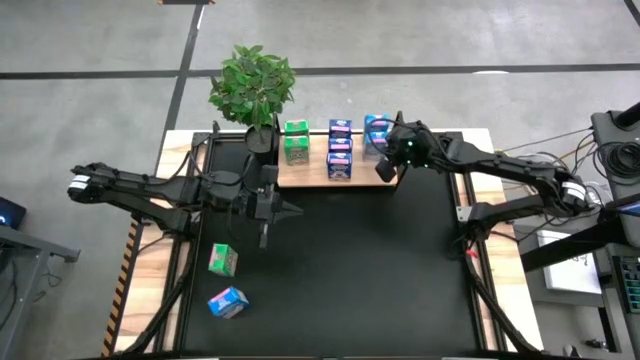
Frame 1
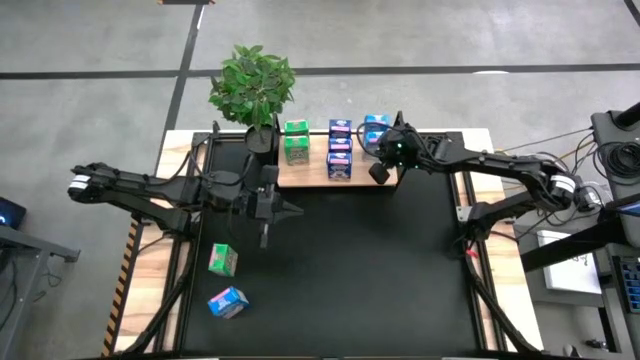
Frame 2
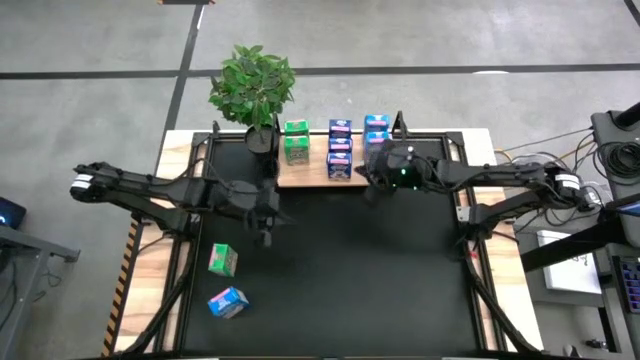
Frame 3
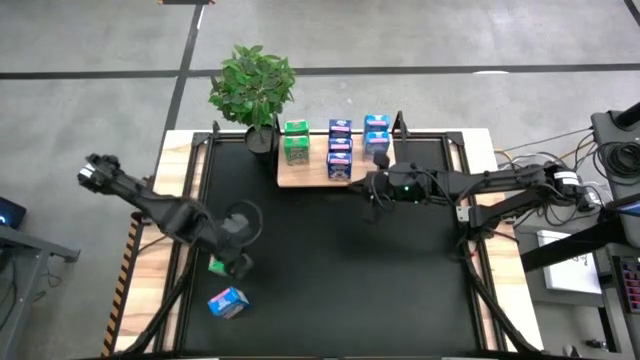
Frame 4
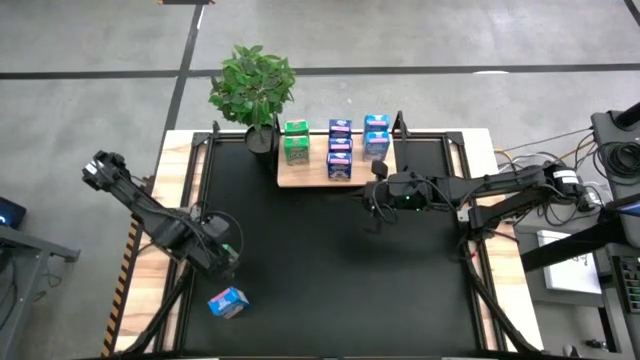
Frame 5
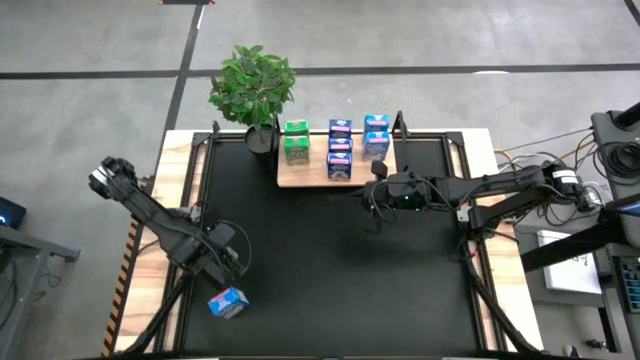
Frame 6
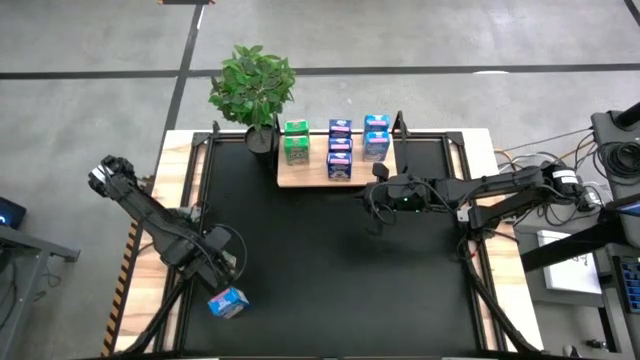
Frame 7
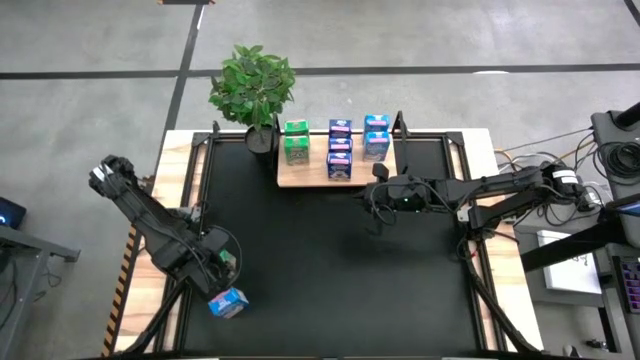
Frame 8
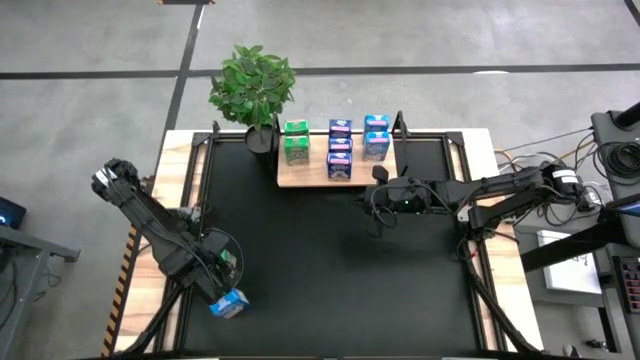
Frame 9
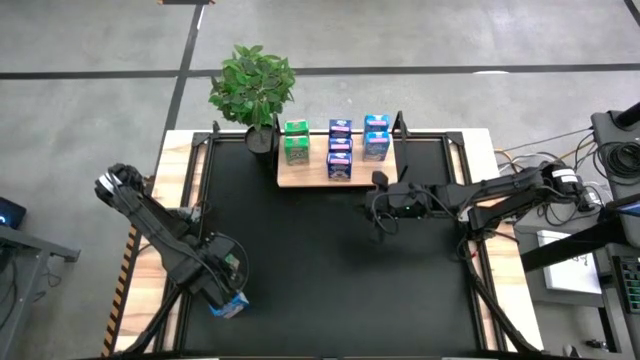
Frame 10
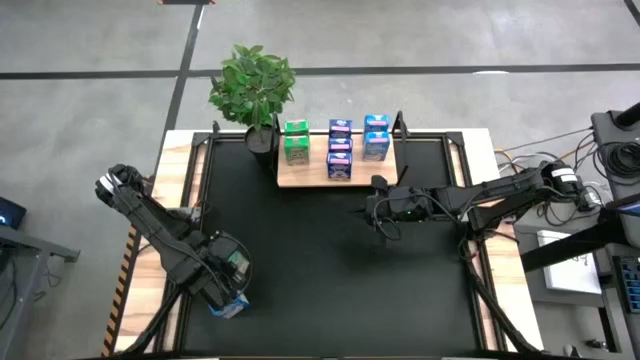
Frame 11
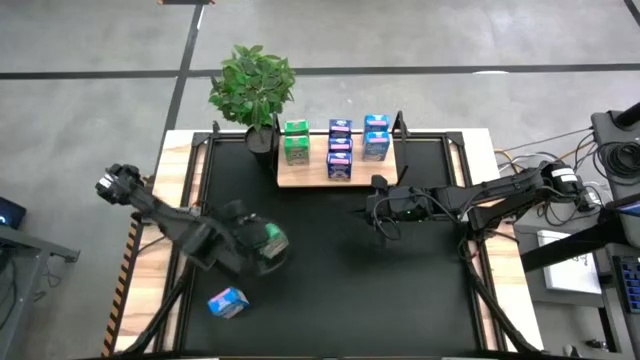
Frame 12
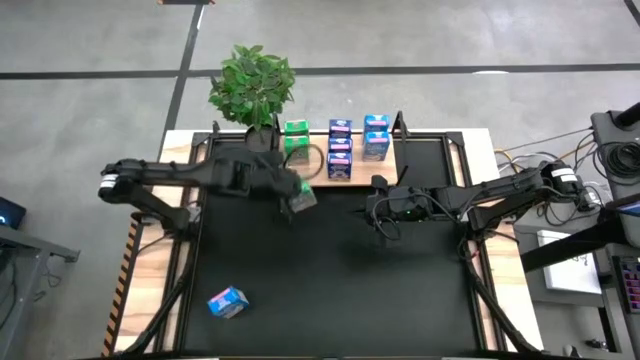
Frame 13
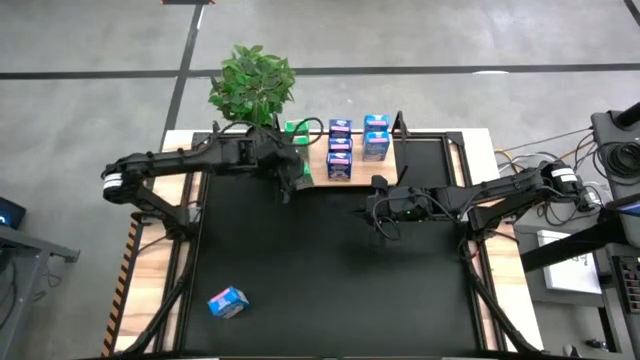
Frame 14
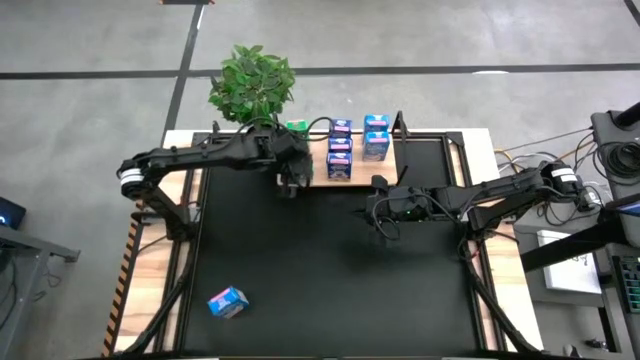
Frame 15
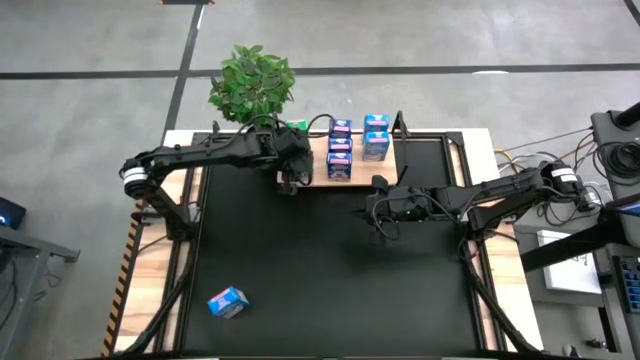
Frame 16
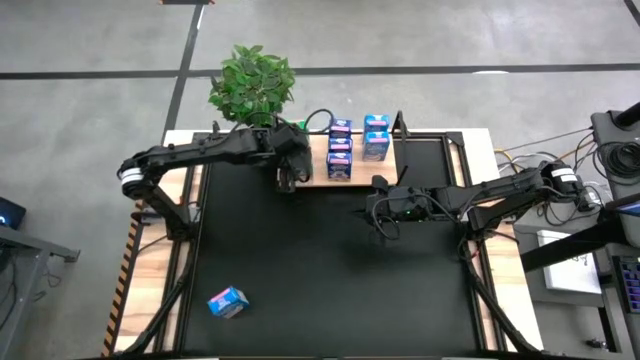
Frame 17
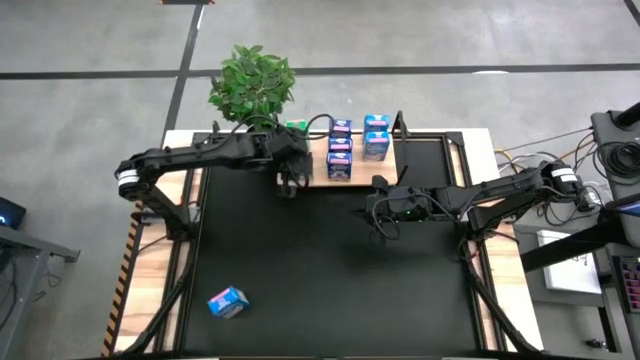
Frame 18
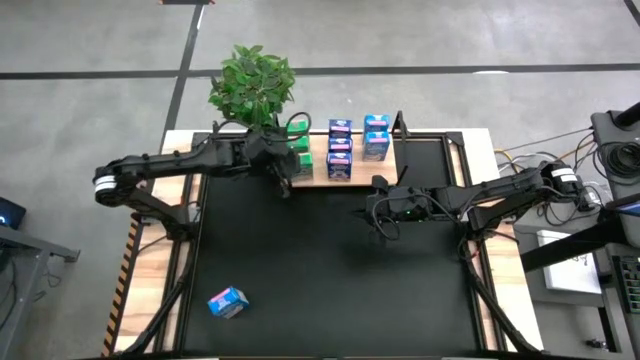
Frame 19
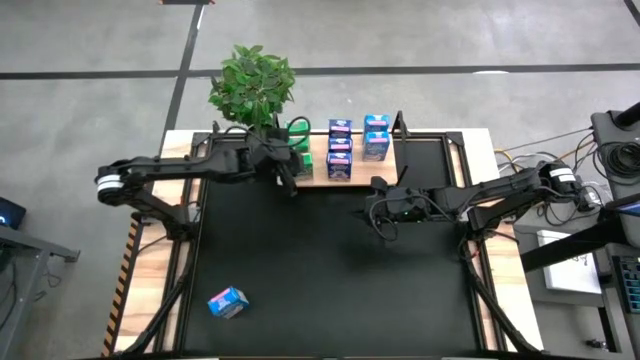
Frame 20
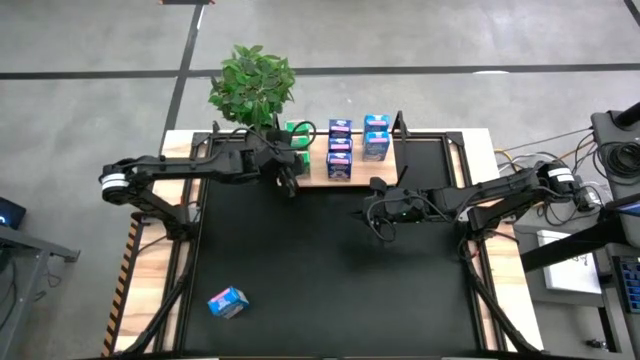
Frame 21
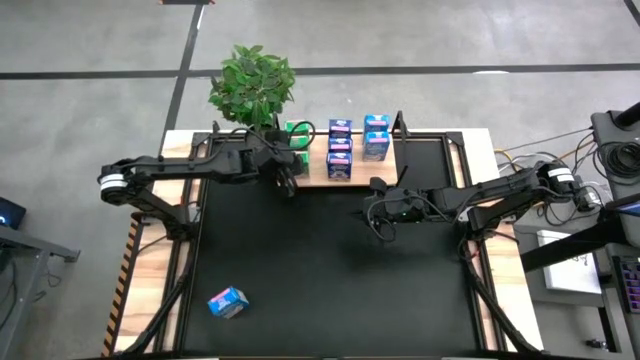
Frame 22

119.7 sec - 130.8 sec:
Task: Stack cereal on shelf
Put the green cereal box aligned with the green cereal boxes on the shelf

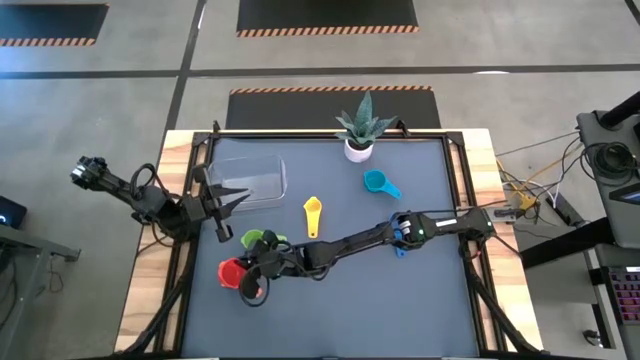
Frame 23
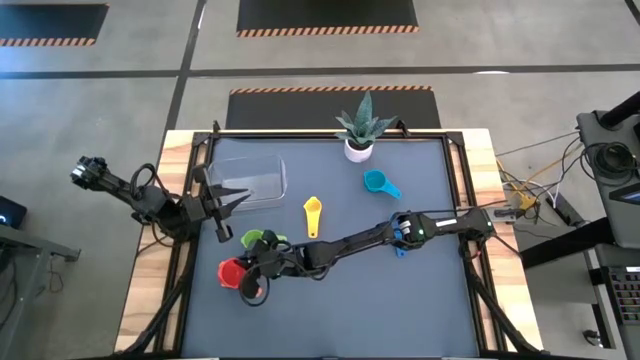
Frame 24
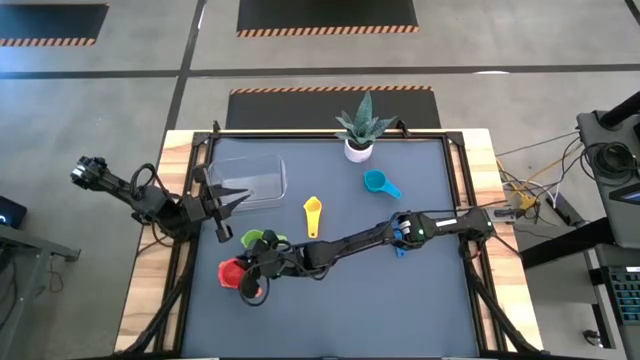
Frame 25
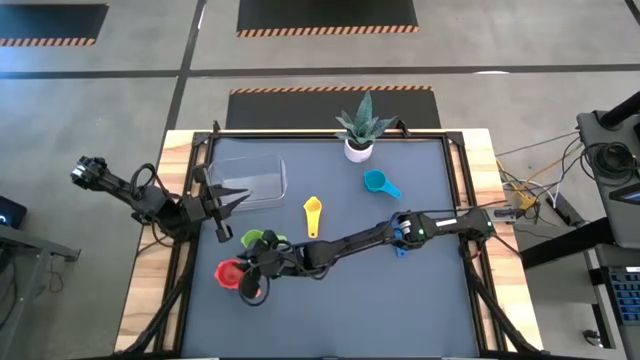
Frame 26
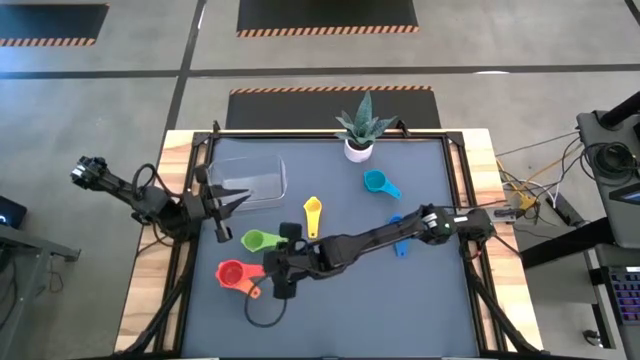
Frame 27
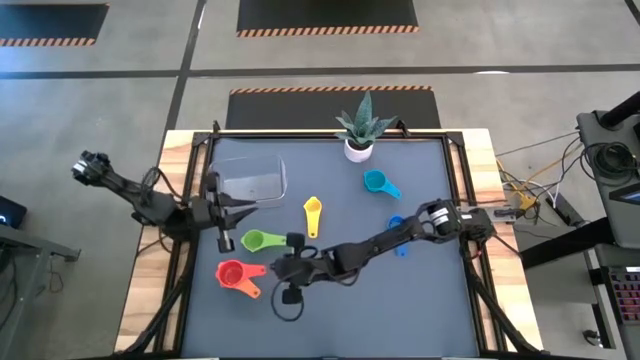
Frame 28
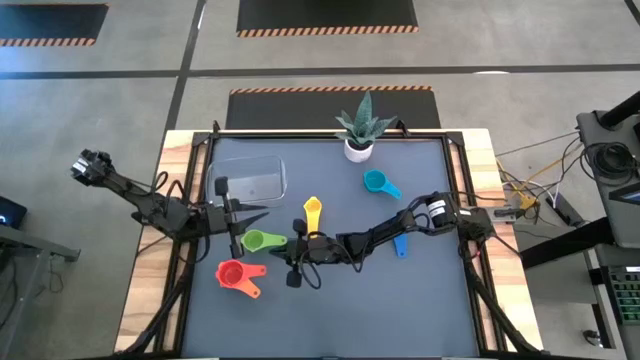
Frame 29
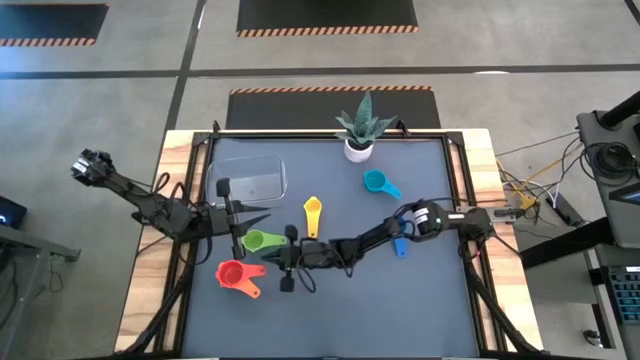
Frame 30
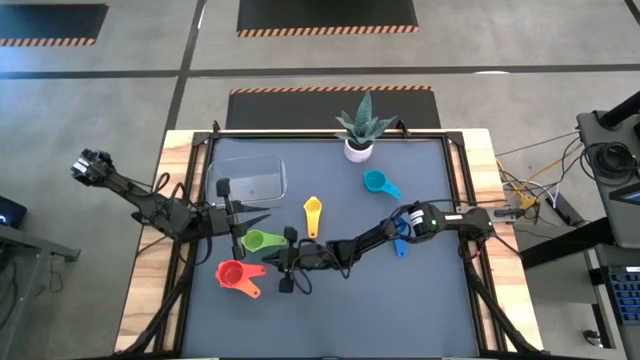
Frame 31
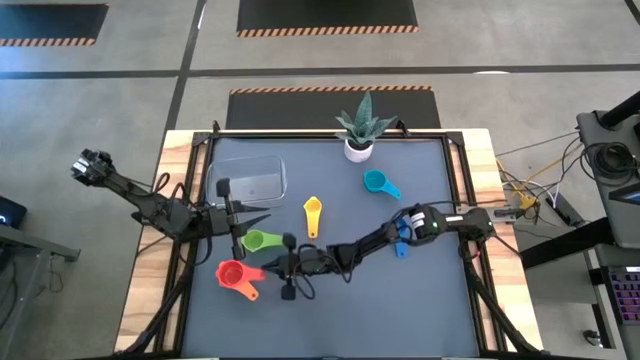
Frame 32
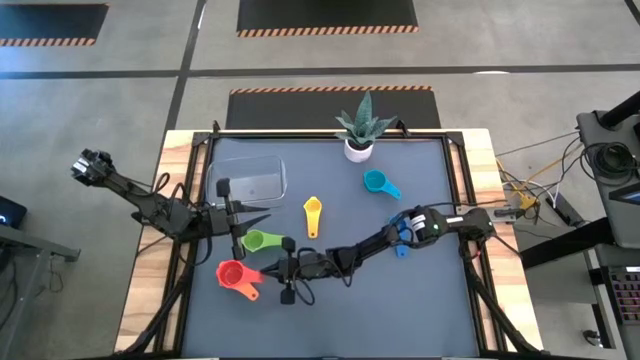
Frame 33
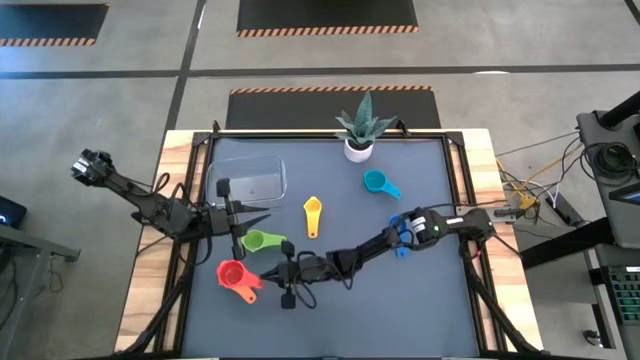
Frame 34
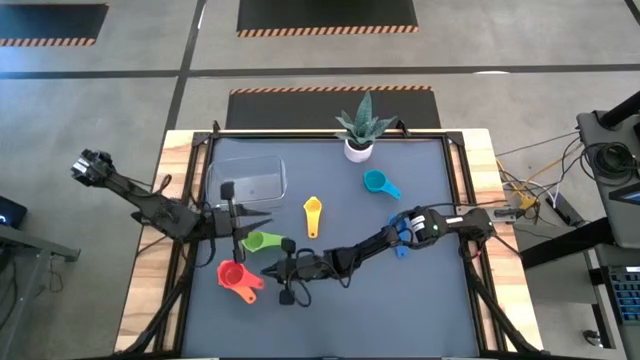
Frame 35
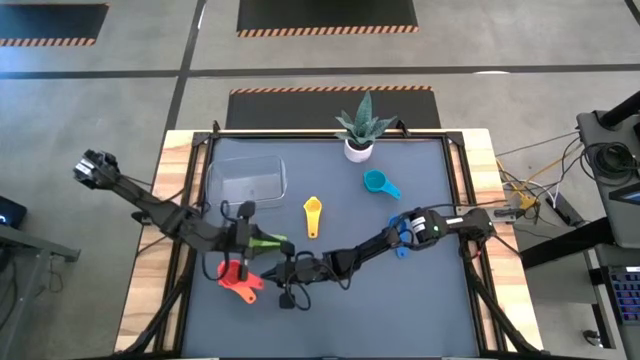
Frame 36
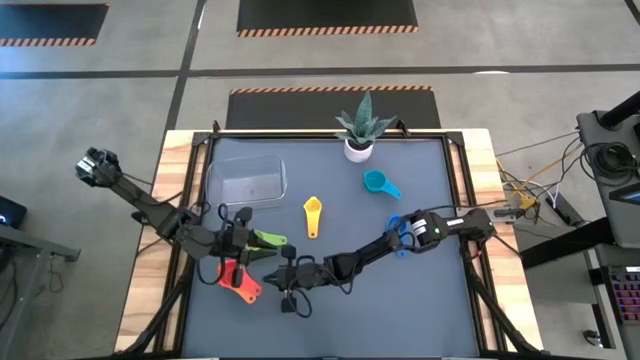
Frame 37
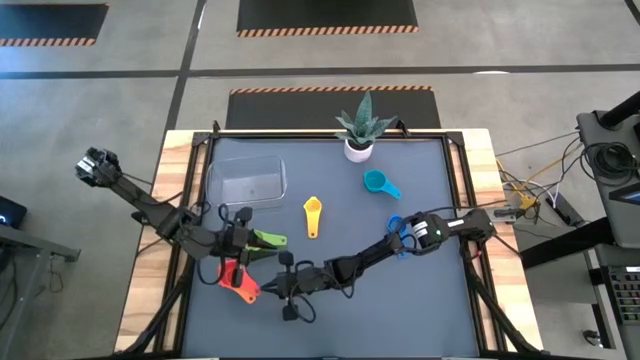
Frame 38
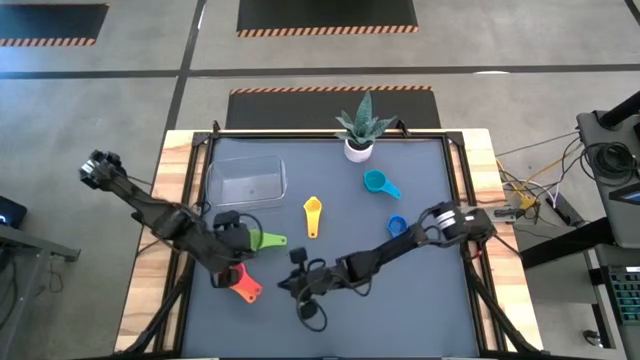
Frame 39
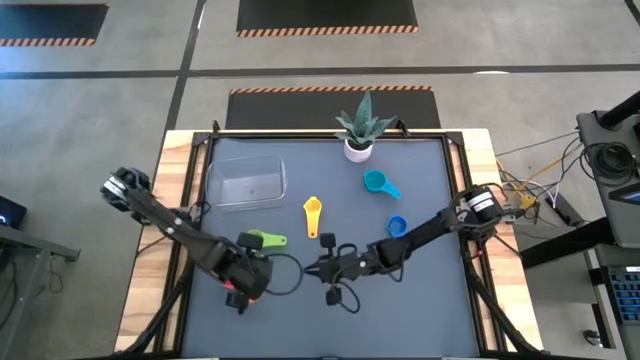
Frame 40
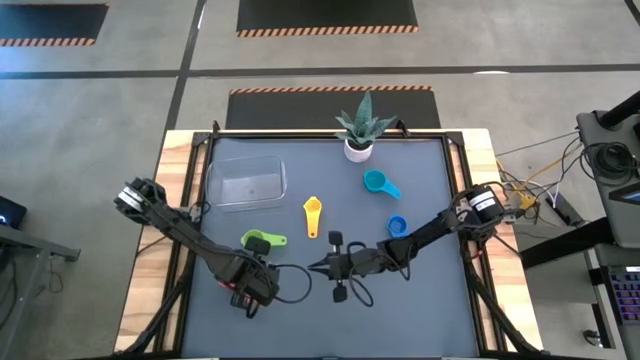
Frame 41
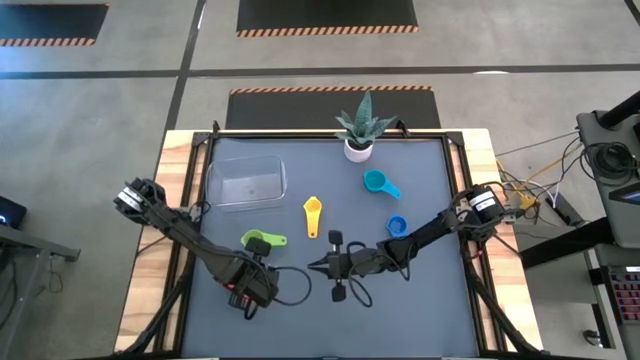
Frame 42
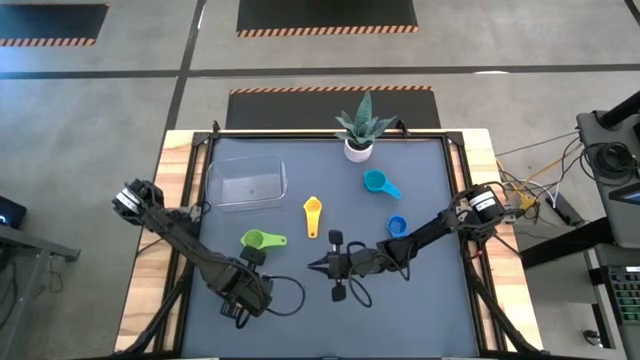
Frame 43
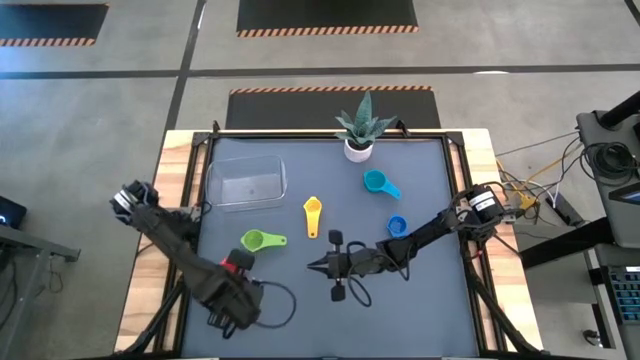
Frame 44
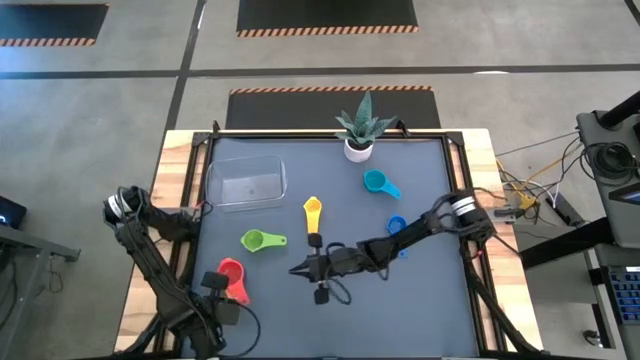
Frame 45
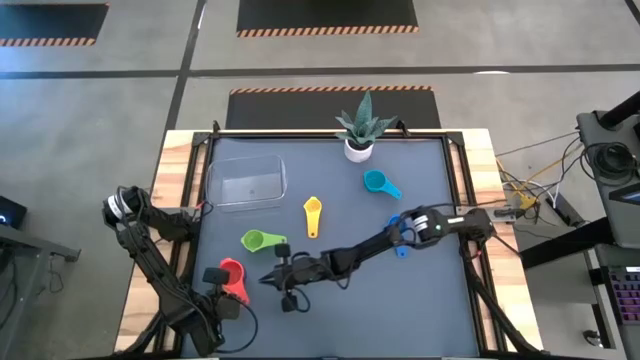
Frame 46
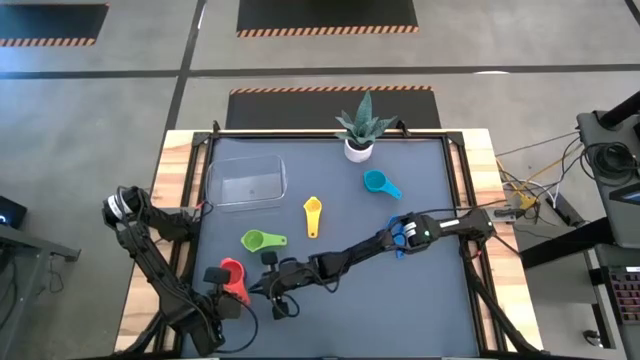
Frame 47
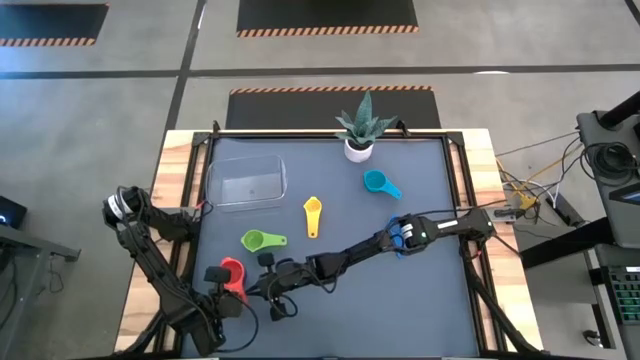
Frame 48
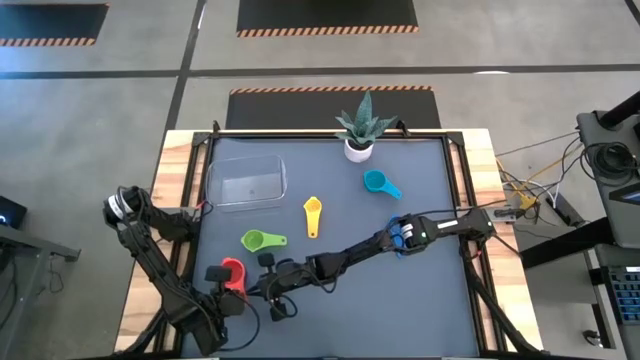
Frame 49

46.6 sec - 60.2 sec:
Task: Nest measuring cups in basket
Stack the red measuring cup on top of the orange measuring cup
